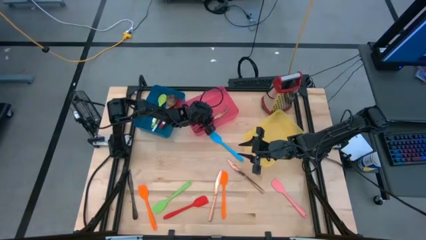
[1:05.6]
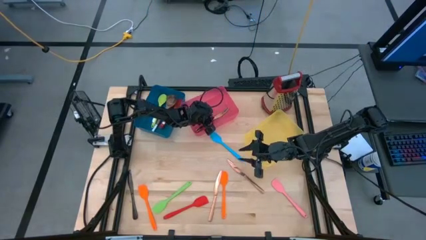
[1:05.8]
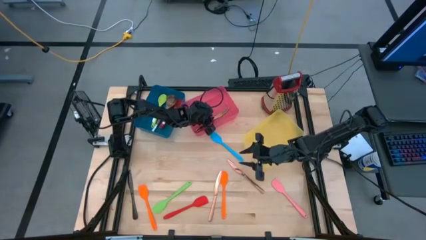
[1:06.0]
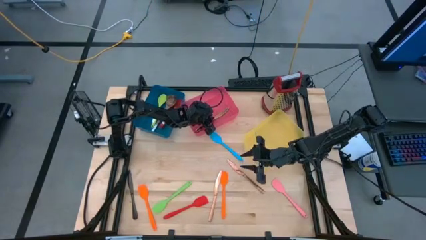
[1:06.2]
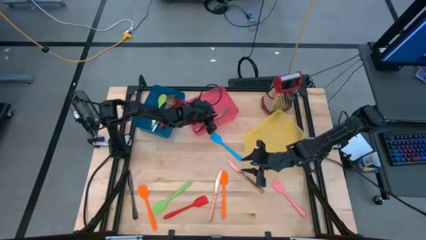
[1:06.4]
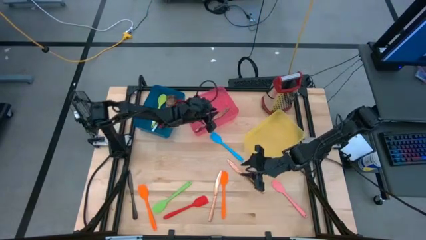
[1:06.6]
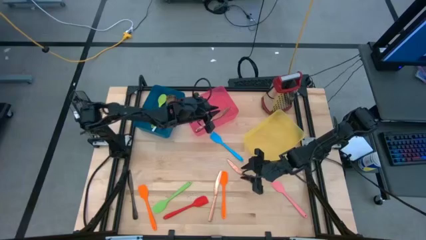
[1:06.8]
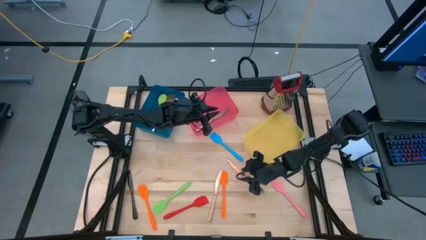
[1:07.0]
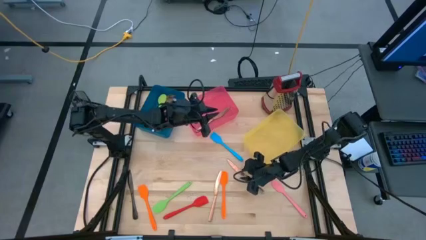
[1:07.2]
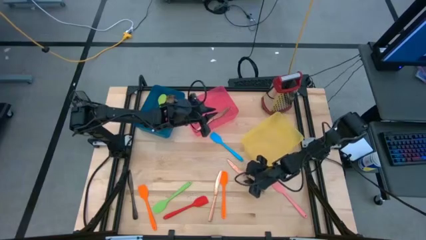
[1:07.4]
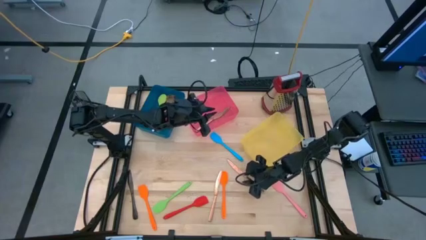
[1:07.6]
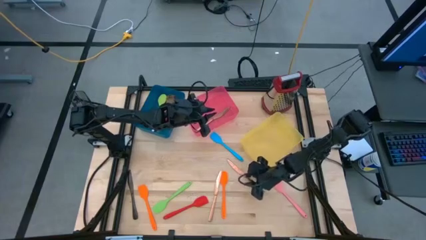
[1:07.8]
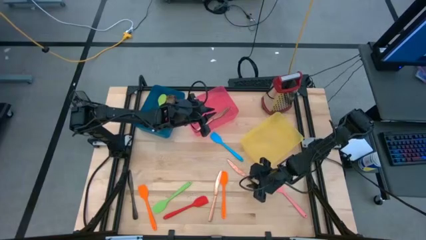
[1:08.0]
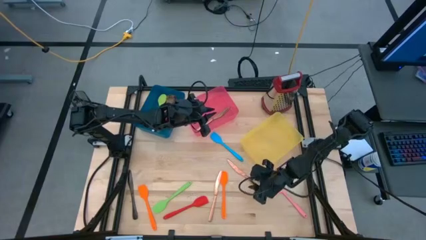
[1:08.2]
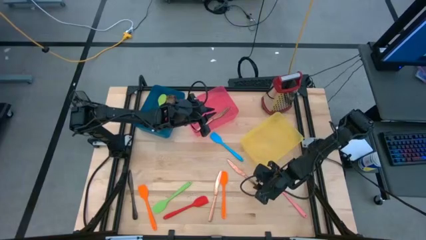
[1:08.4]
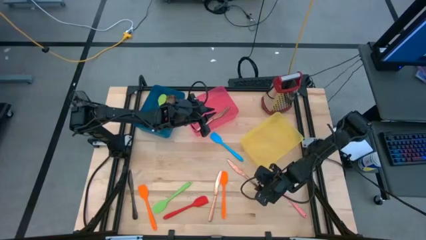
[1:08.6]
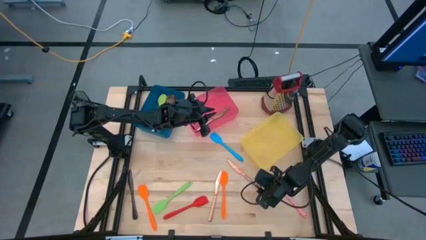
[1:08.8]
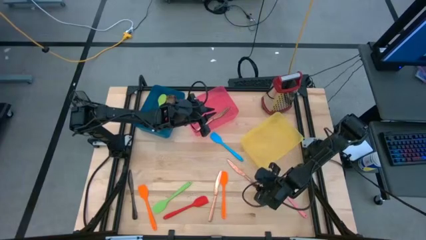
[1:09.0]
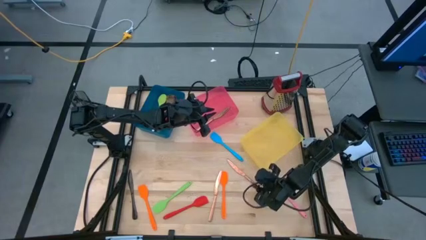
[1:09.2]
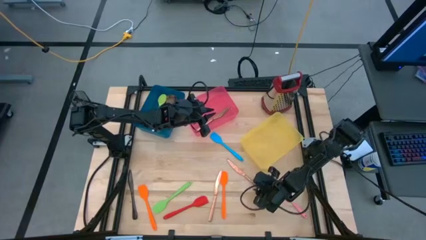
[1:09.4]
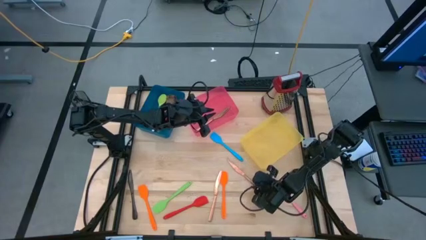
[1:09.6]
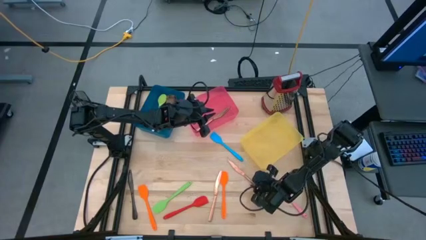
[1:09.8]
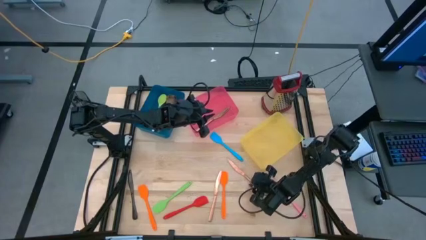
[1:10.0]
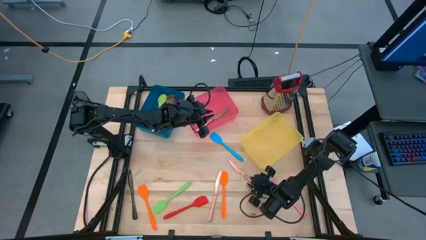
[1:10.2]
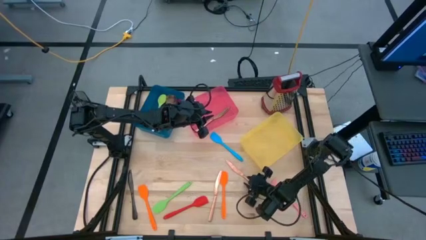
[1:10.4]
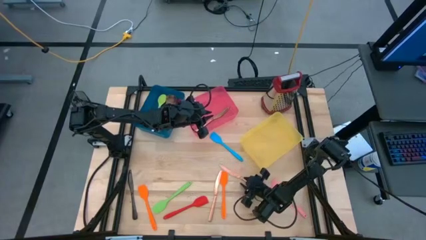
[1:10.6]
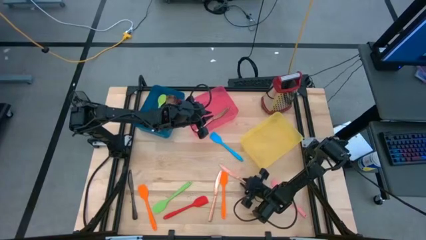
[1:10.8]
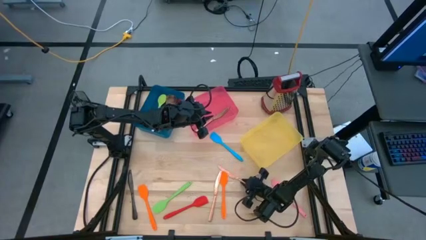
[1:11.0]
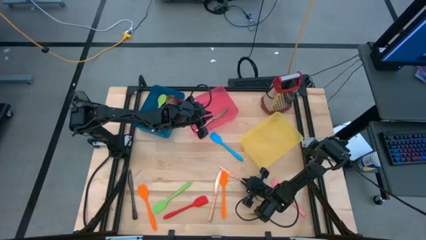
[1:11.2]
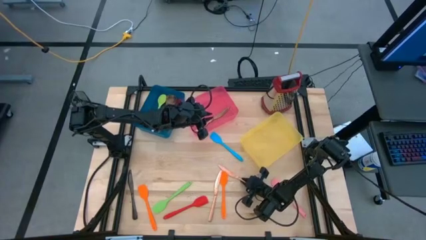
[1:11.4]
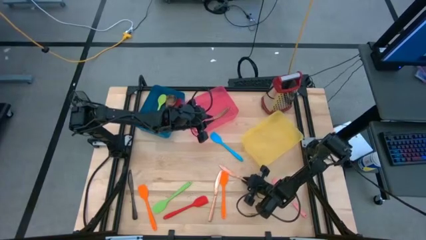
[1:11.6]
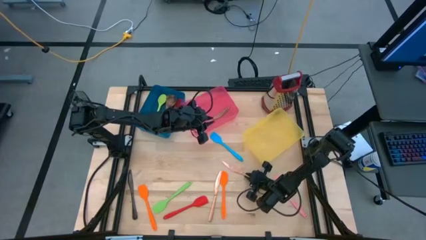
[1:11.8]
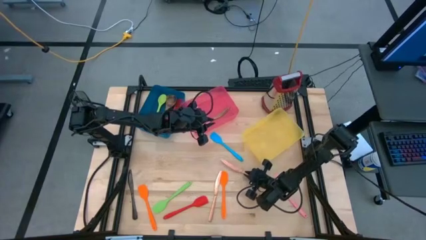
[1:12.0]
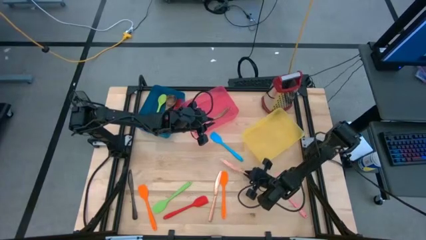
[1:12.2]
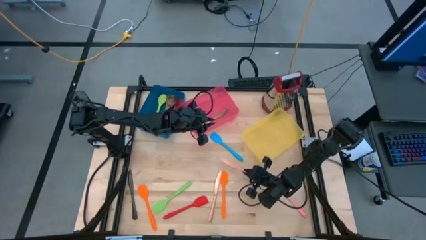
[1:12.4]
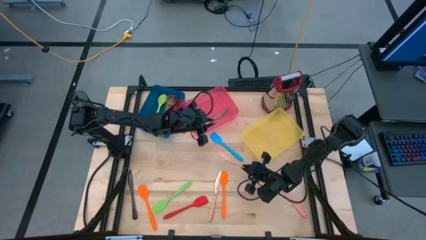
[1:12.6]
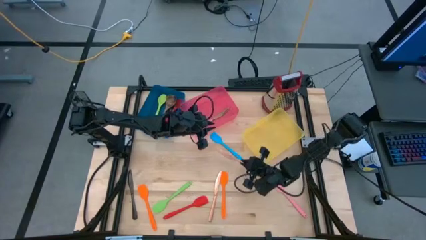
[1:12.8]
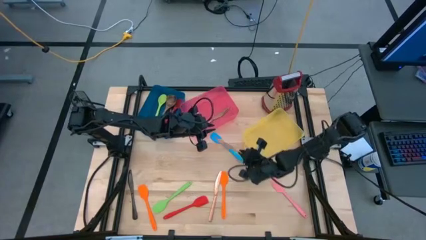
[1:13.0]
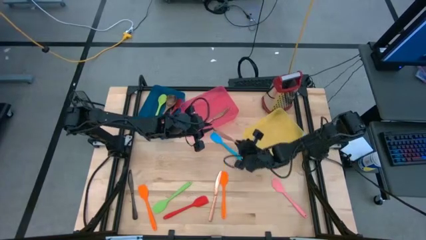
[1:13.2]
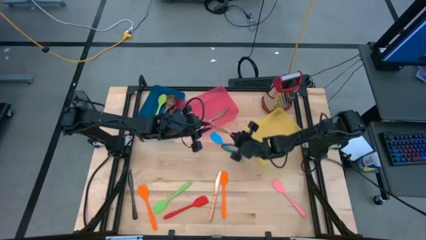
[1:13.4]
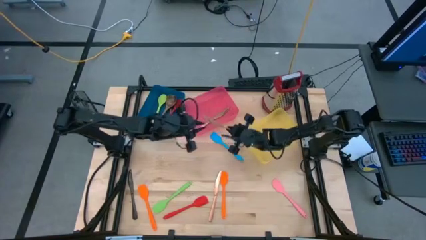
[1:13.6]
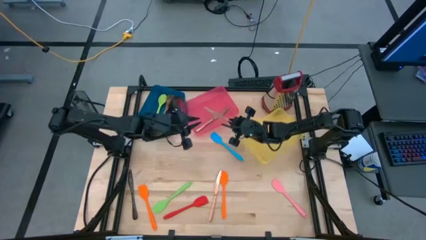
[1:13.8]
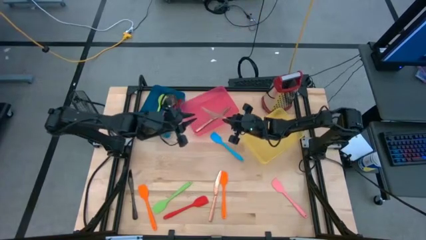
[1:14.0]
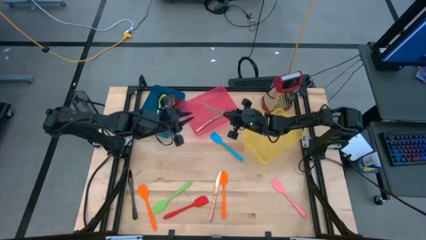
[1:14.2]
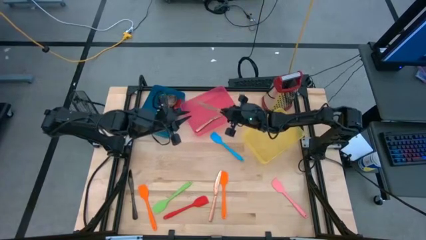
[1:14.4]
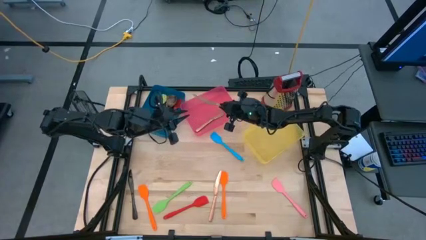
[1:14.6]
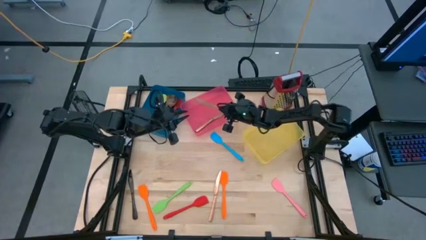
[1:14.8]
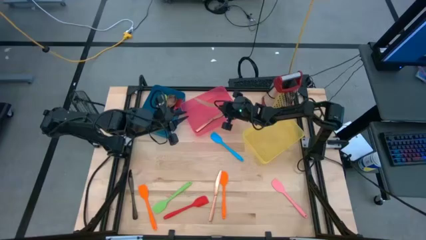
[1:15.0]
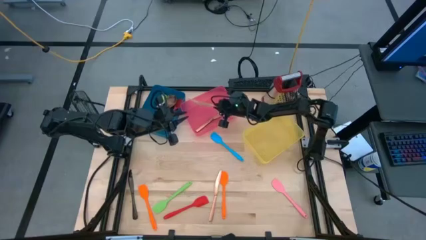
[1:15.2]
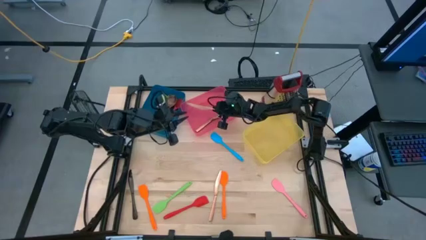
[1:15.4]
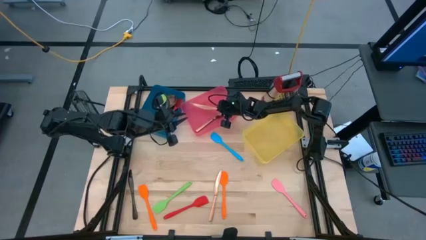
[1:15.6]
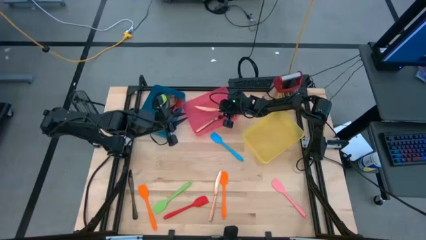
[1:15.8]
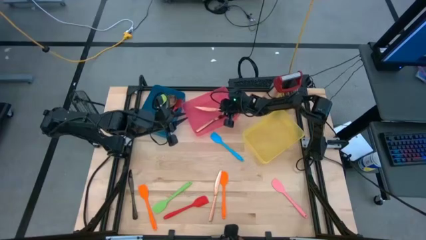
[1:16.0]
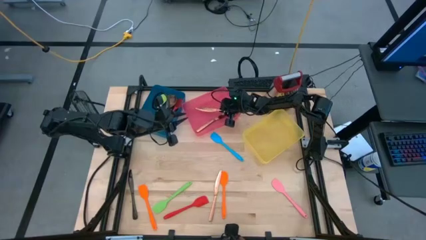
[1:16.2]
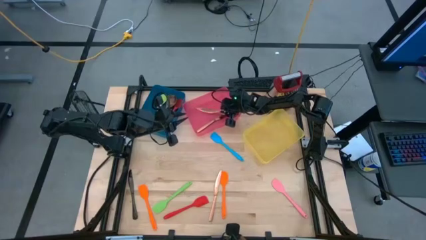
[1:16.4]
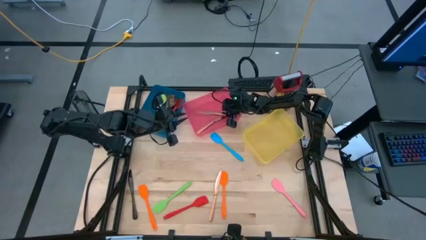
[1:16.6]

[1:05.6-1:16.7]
Task: Pick & Place Kitchen Items
Put the right gold knife into the pink bin

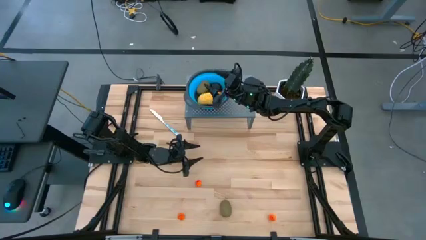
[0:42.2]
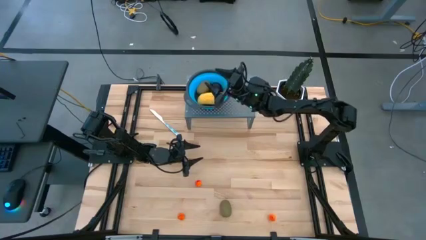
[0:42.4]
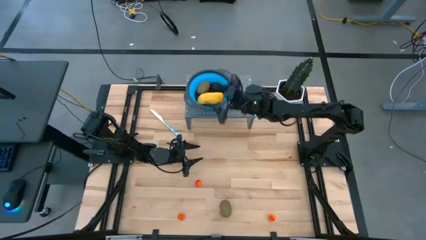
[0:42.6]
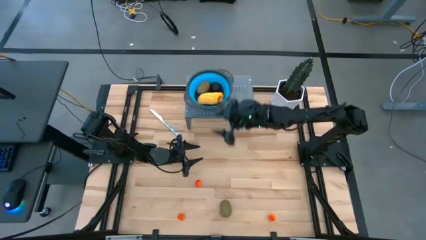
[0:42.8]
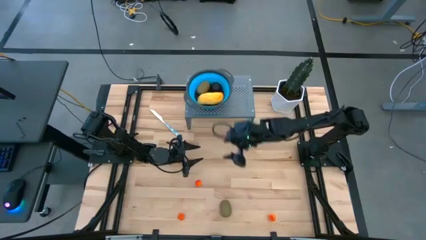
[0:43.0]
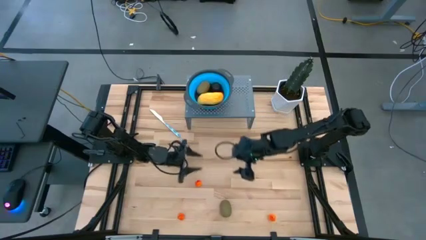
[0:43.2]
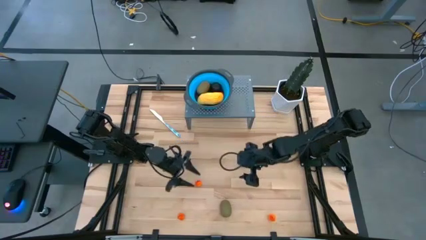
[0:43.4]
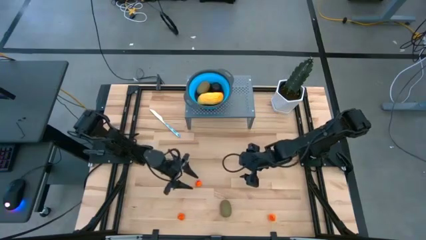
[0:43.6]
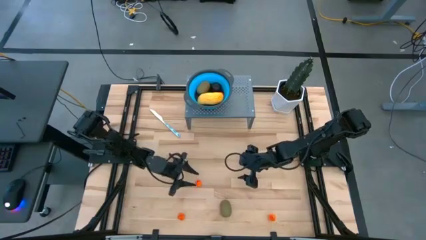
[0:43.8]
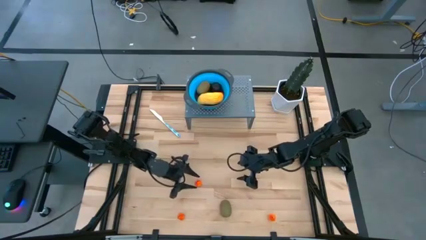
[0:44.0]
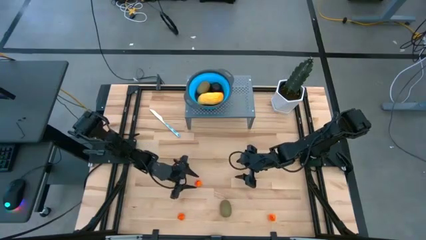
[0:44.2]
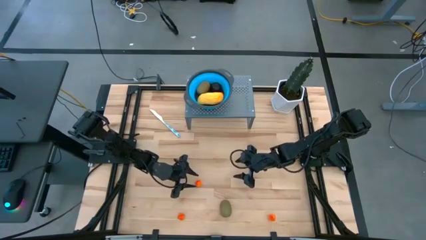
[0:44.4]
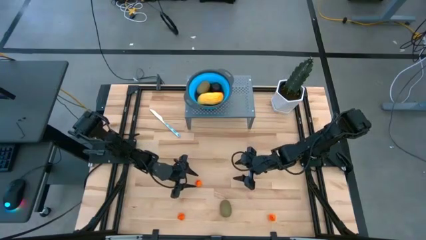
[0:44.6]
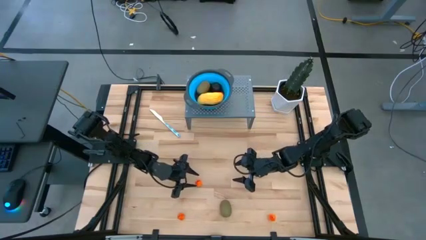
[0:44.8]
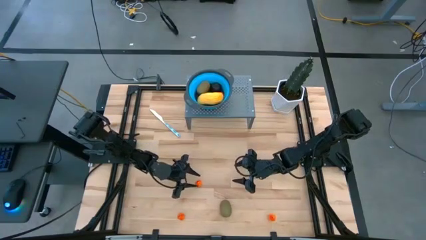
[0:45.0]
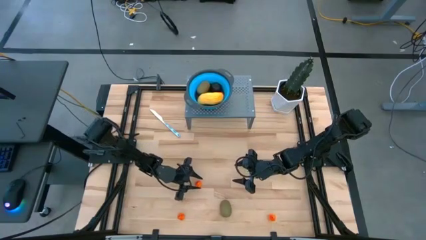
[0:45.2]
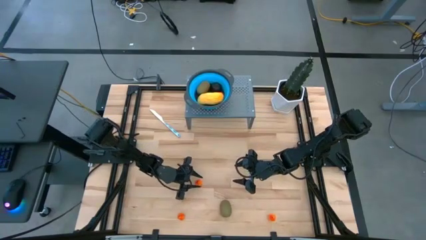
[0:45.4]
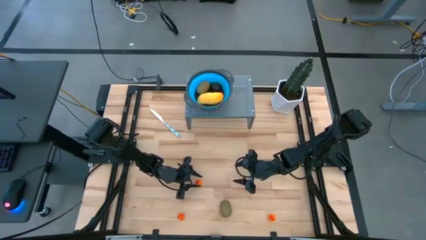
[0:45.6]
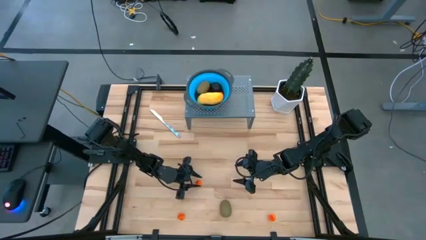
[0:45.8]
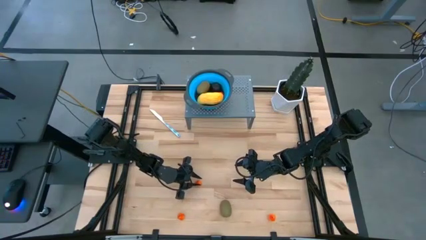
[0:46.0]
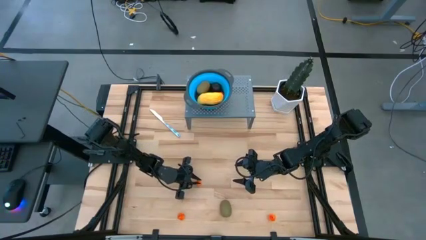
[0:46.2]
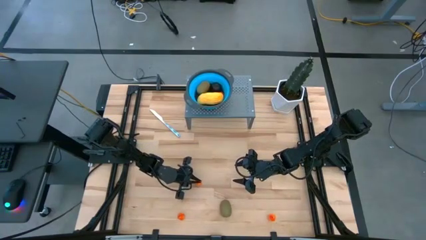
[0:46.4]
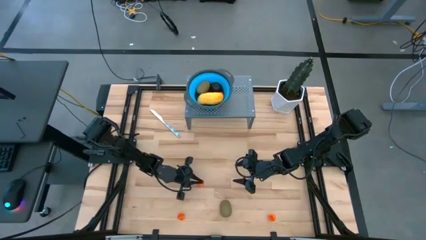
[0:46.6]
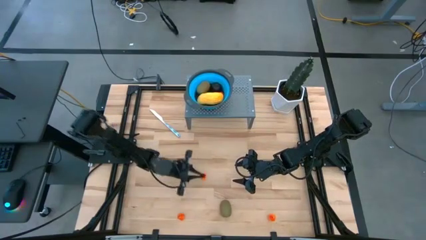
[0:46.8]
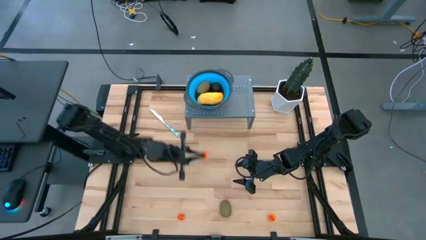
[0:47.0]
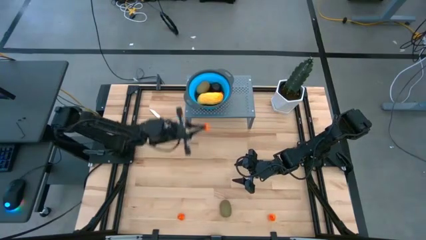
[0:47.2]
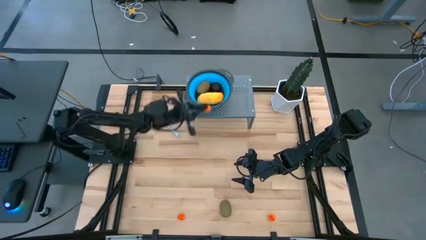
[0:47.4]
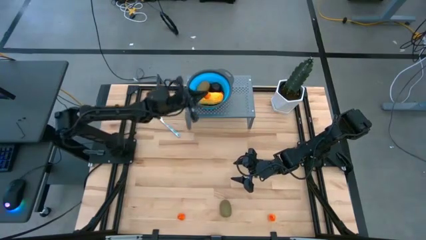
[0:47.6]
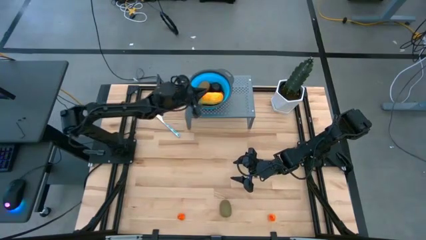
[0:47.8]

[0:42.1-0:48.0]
Task: Pick & Place Fruit
Put the orange pear into the blue strainer bowl
